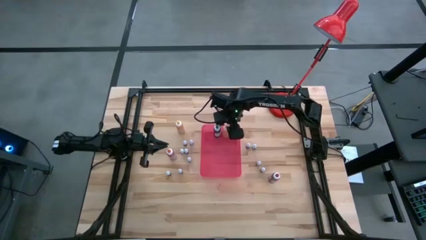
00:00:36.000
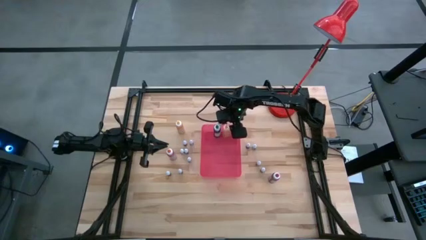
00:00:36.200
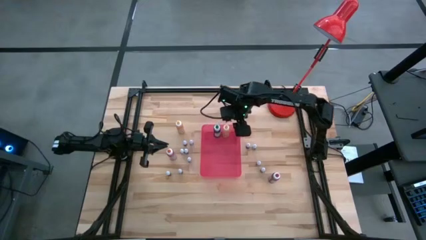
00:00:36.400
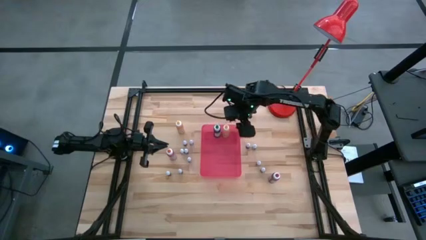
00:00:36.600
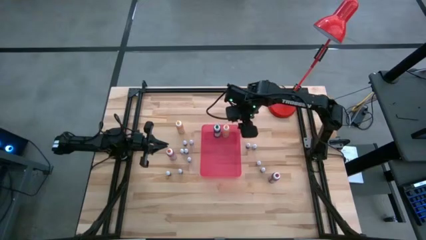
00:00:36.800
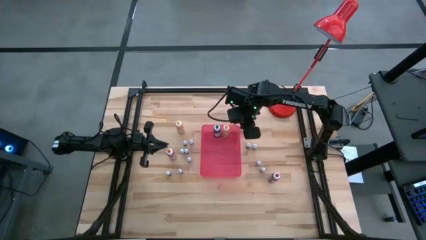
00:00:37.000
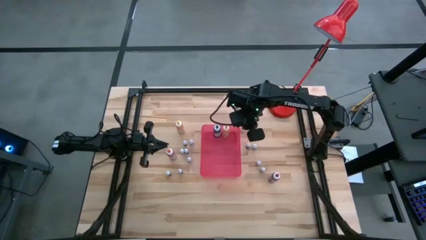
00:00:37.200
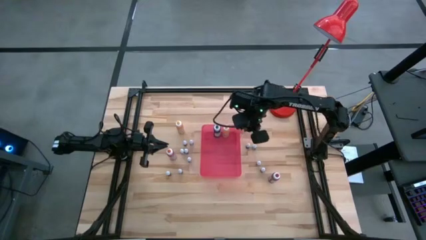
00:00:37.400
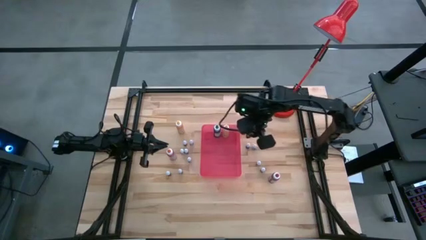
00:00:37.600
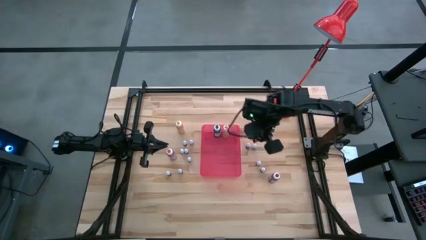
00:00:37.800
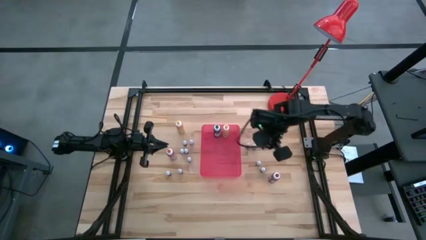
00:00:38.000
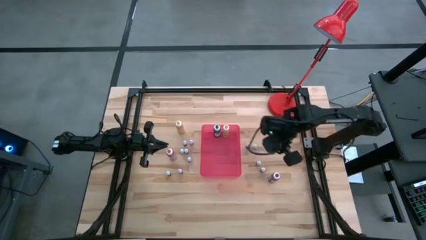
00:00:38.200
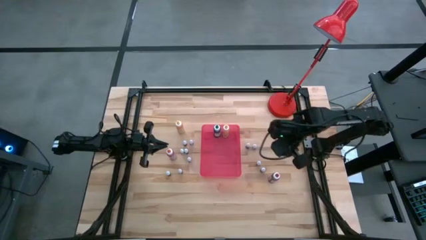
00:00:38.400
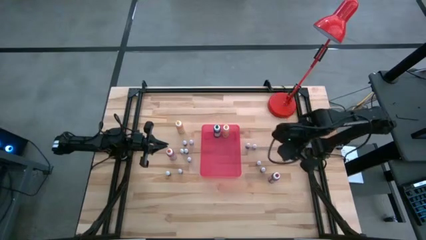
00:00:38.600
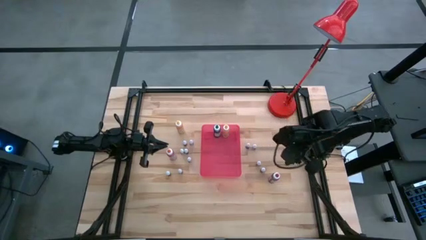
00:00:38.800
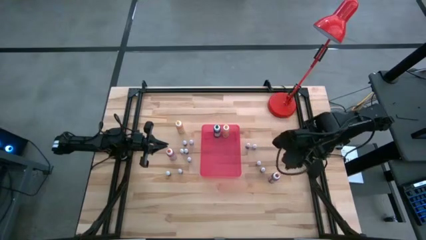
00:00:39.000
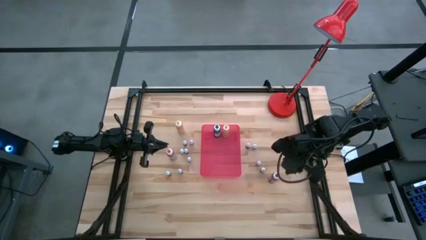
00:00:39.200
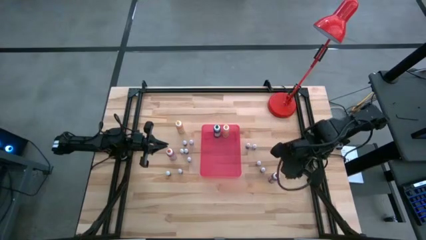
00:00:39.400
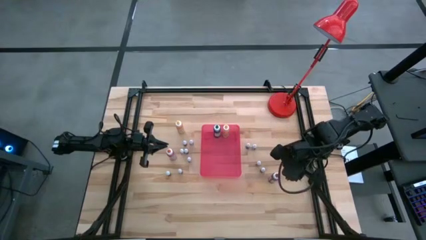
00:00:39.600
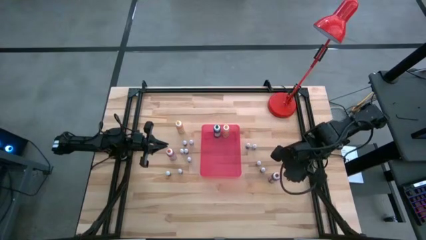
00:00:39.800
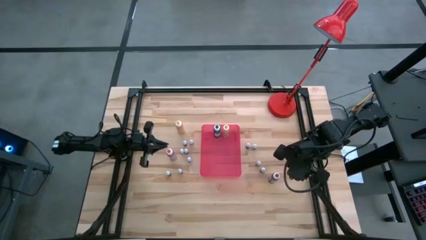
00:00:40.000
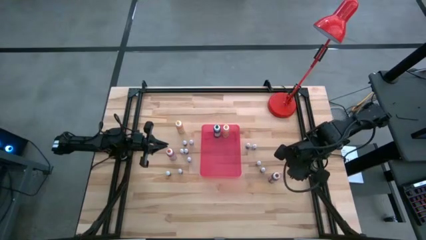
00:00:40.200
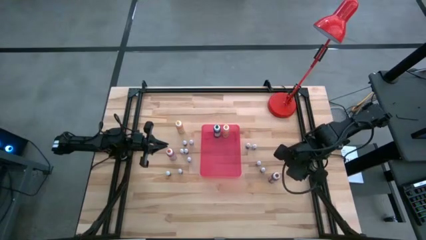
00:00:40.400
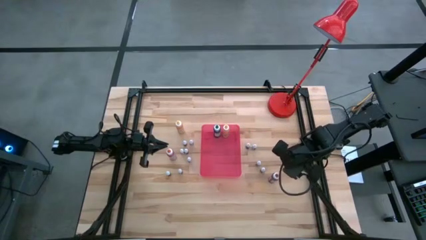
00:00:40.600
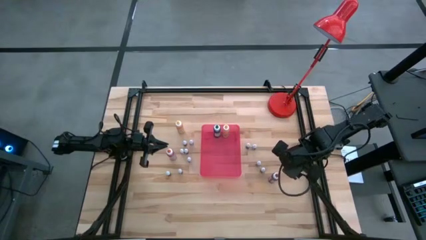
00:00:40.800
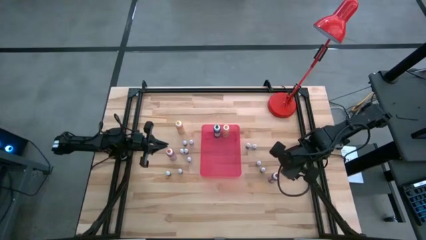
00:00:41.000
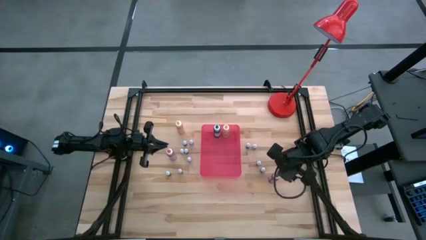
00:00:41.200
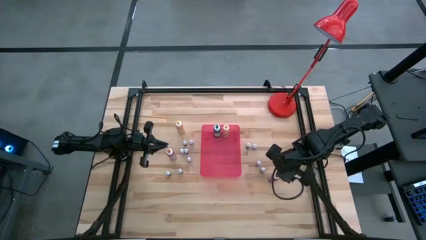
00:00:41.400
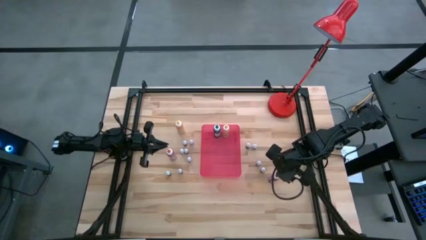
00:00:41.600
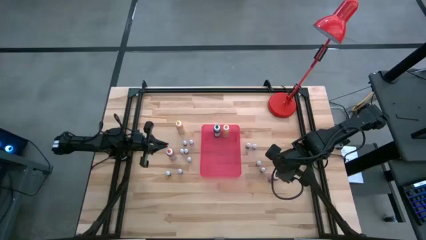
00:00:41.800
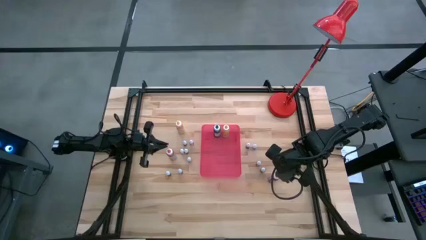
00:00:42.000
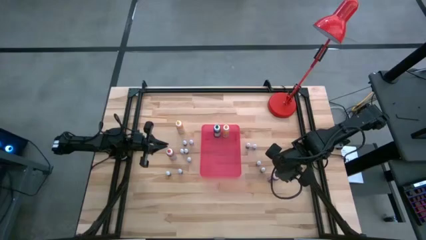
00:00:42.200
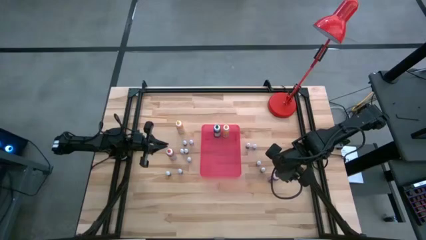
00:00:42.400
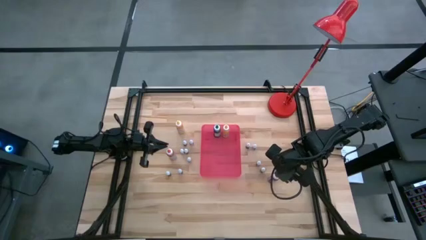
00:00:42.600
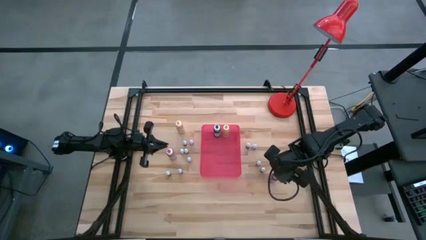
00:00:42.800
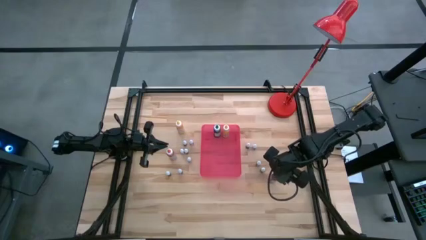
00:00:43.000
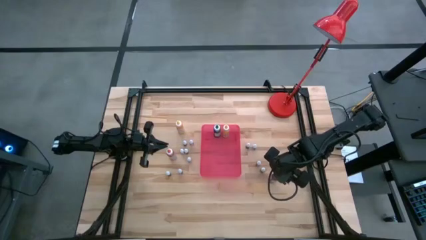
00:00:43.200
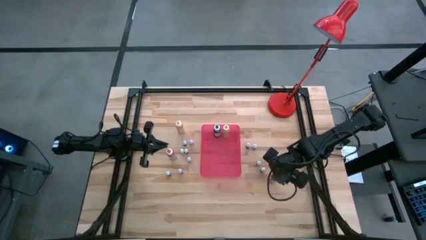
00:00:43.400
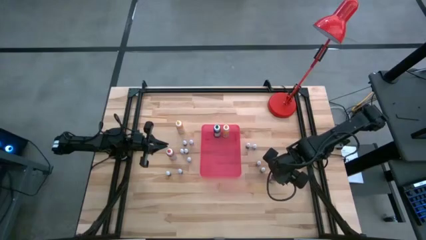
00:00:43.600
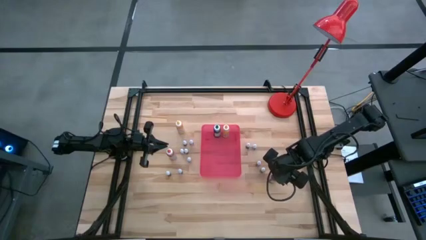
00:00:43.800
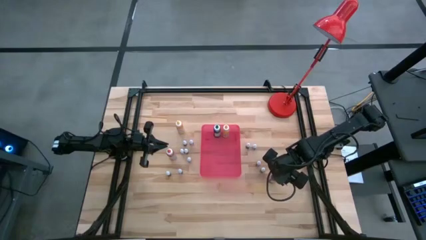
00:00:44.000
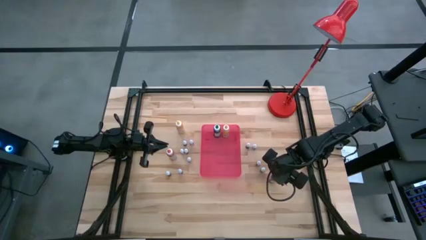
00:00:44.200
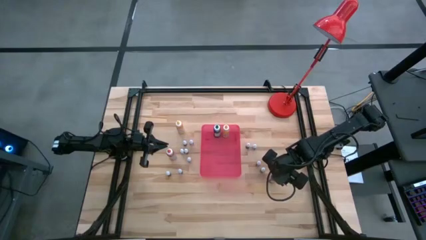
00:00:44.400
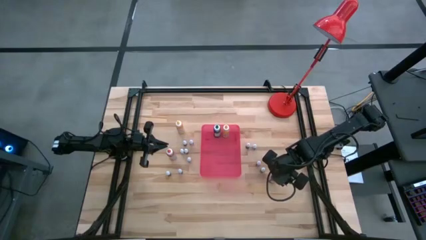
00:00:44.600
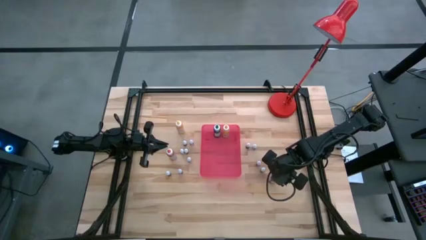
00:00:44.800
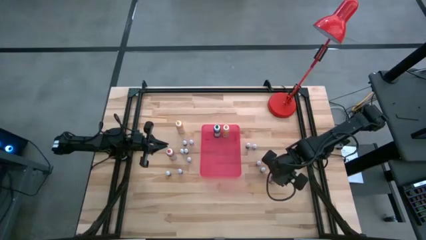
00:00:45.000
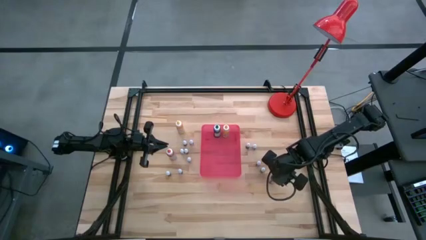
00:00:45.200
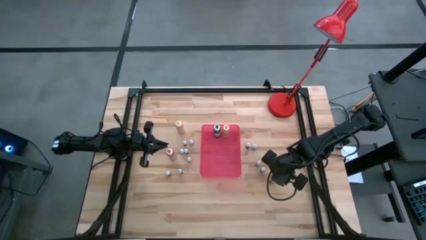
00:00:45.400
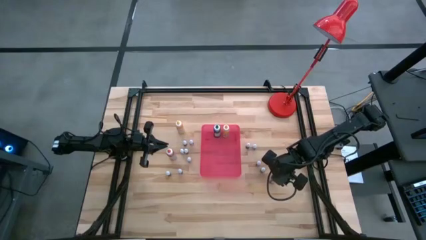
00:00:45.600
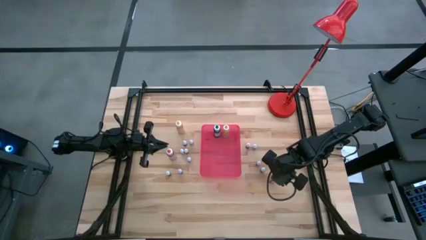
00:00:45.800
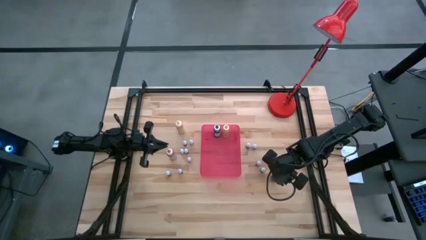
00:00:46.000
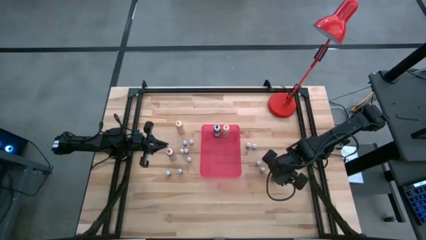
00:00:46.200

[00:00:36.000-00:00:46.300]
Task: Pick & Place food coloring
Put the large red food coloring bottle into the red bin

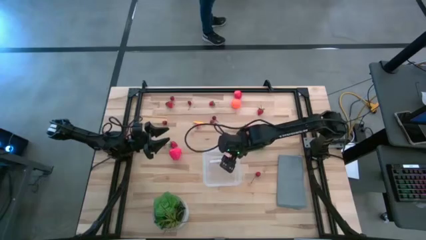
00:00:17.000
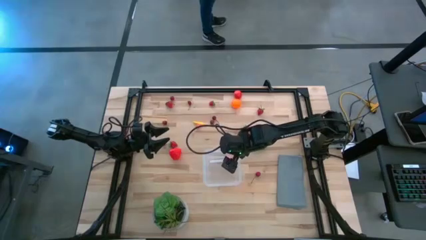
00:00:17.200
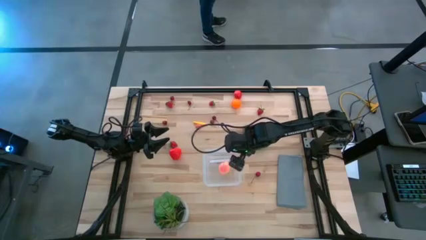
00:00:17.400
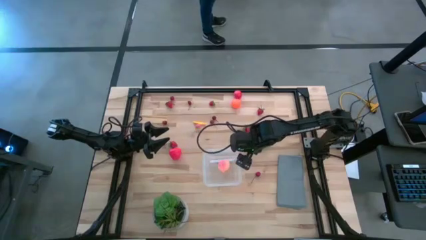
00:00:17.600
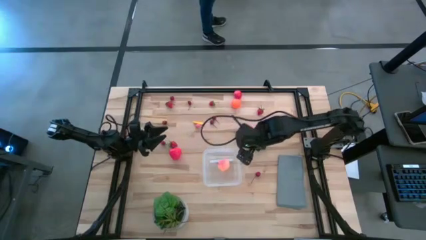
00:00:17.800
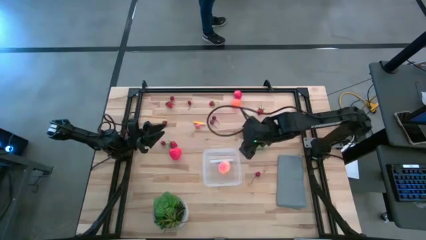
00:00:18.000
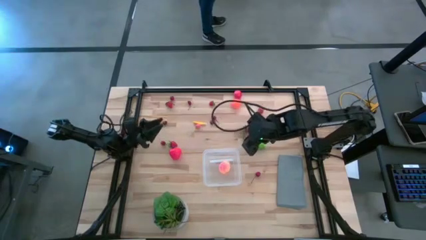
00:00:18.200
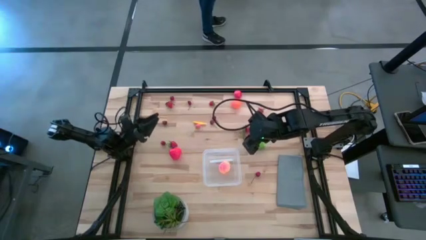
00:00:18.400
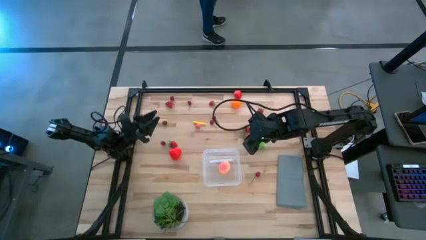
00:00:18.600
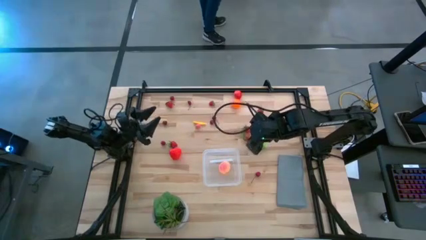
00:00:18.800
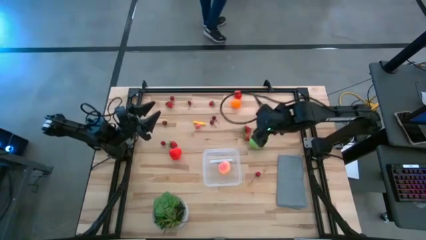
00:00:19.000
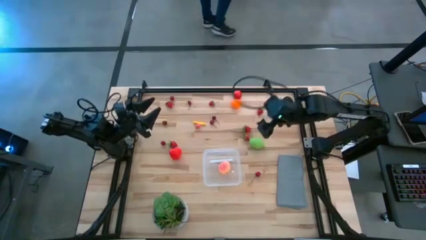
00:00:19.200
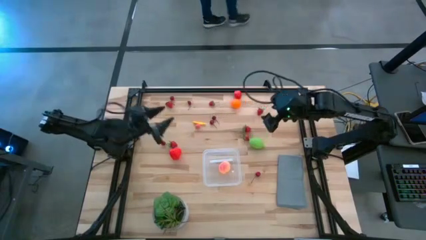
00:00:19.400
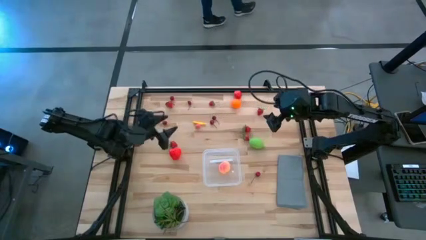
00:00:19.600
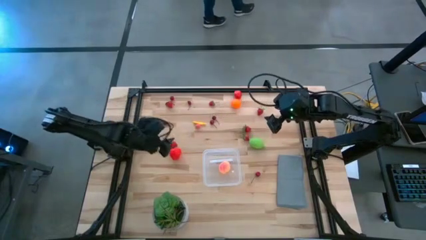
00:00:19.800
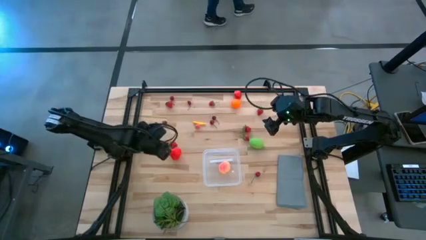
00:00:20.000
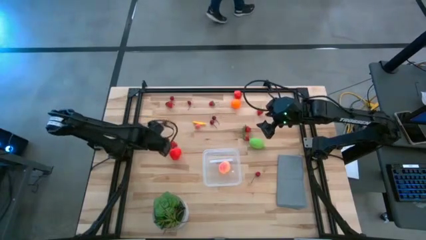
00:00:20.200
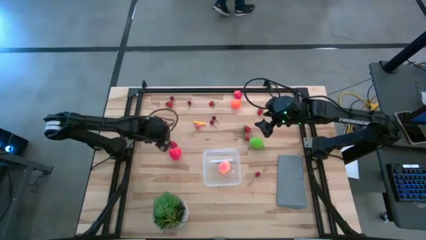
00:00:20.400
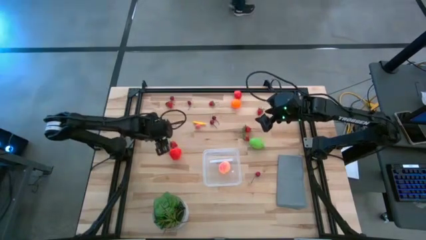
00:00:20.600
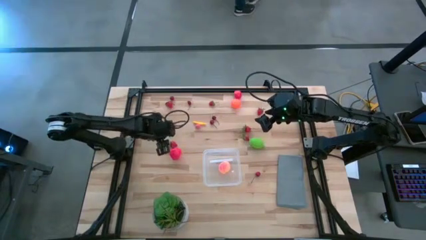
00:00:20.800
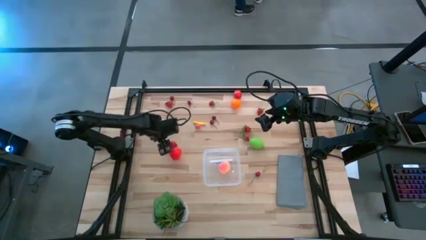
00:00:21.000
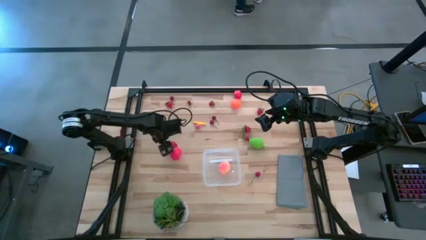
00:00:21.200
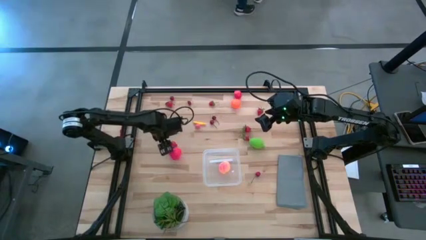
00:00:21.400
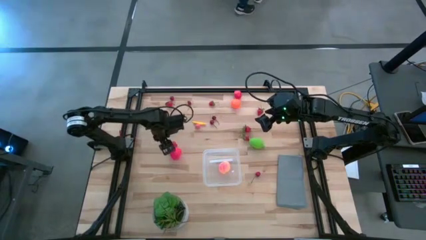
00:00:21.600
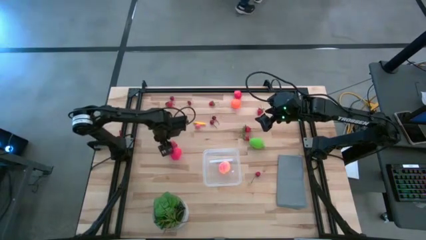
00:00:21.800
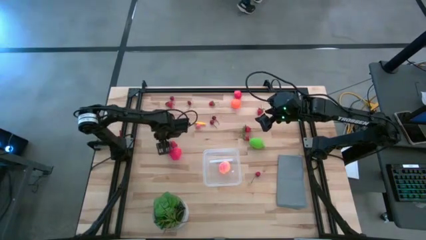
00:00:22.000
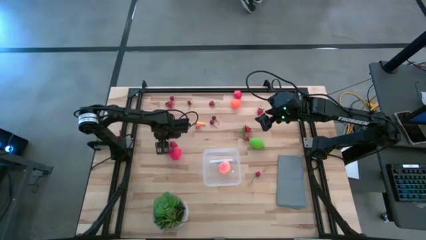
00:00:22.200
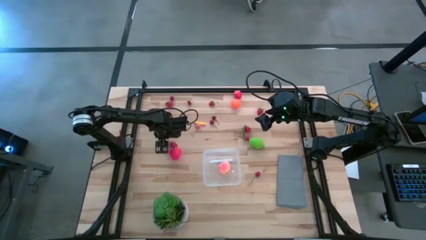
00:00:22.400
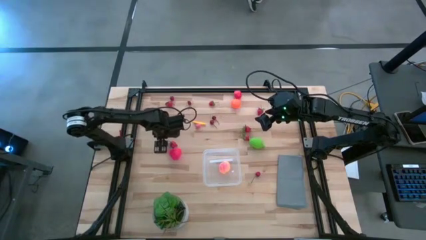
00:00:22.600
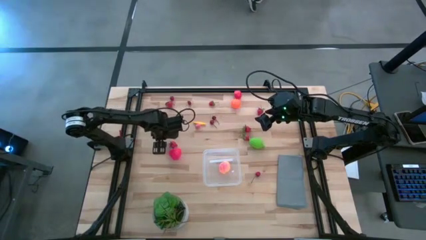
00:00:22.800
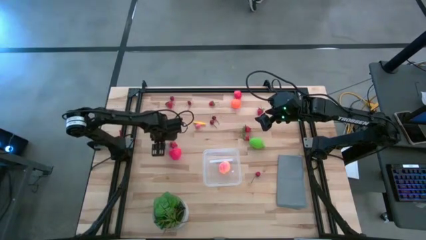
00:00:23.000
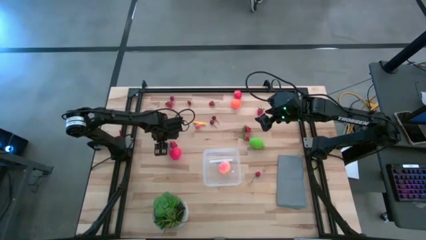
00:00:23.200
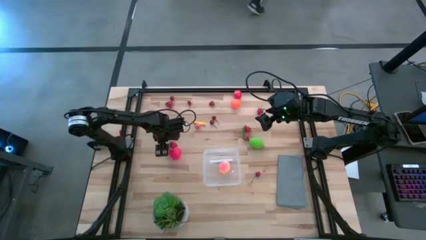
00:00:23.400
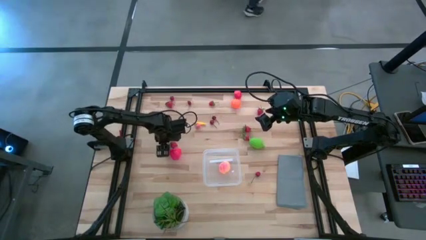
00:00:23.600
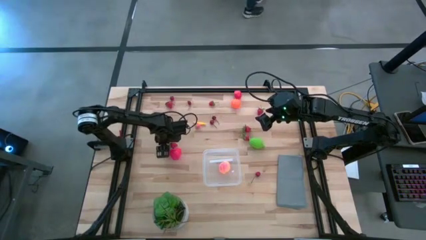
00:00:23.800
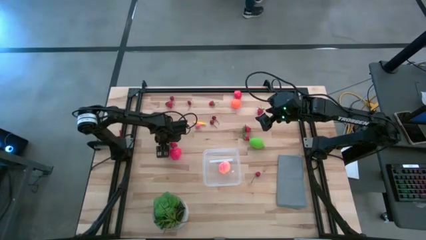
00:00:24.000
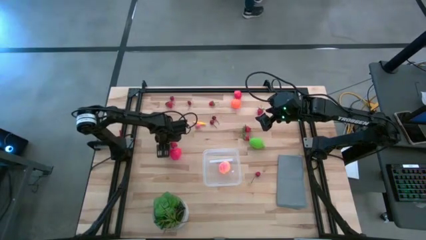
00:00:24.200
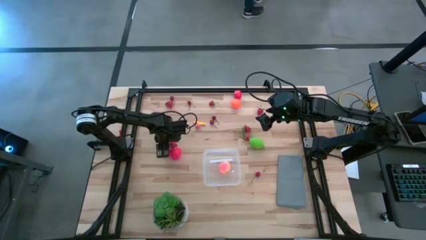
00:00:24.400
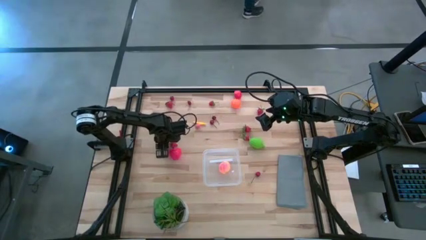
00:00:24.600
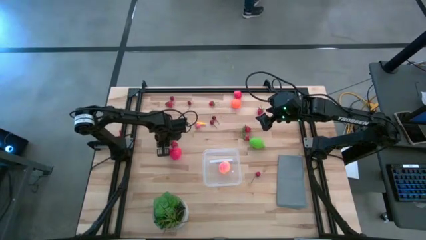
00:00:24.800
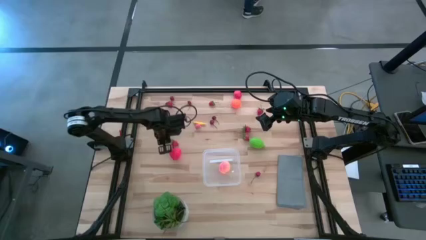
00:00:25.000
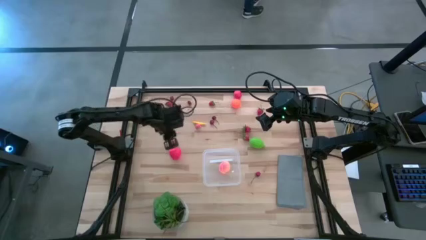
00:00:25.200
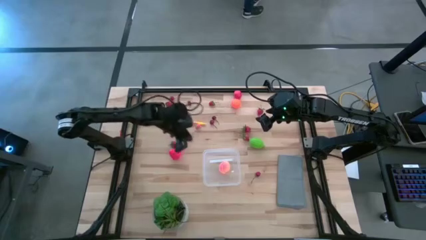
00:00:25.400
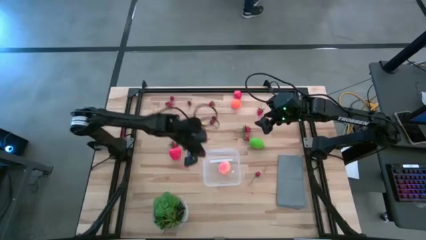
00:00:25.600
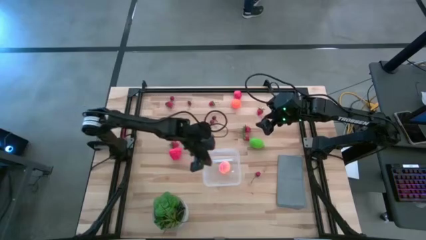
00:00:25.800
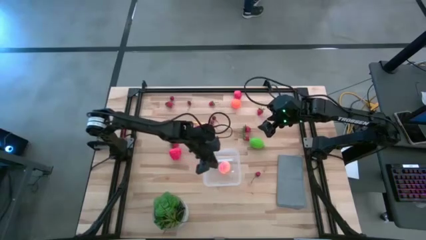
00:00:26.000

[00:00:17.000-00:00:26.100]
Task: Pick and placing Produce into tupperware
Put the red cherry into the transparent bin
